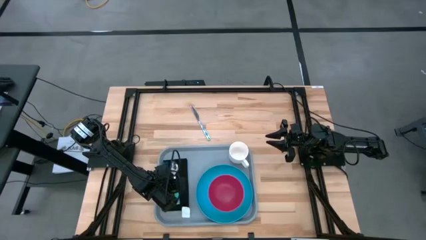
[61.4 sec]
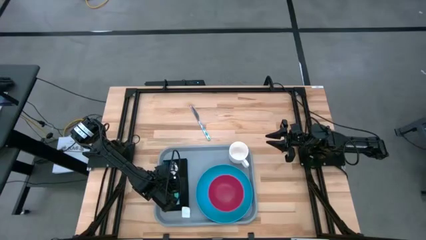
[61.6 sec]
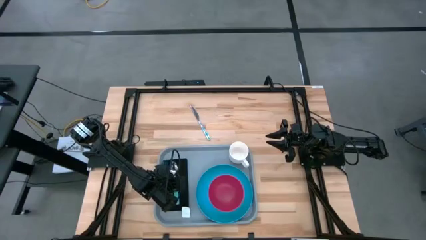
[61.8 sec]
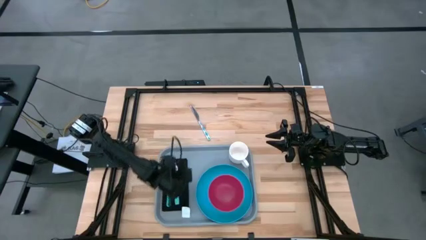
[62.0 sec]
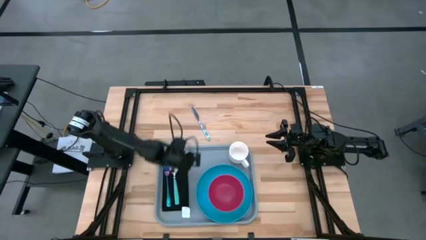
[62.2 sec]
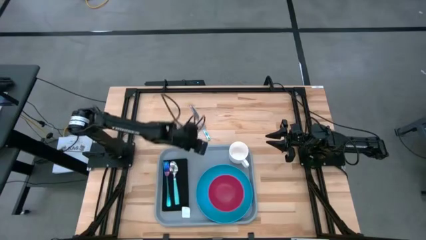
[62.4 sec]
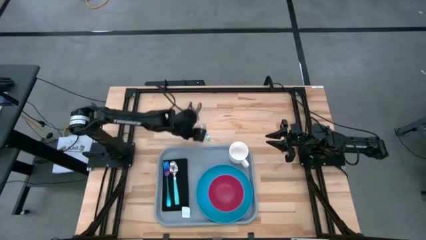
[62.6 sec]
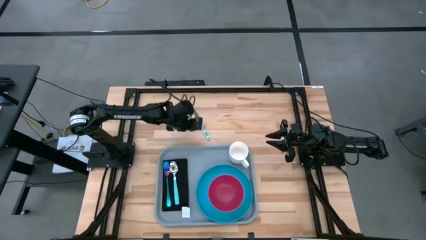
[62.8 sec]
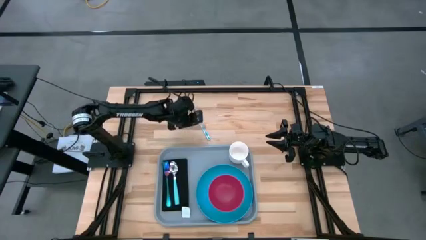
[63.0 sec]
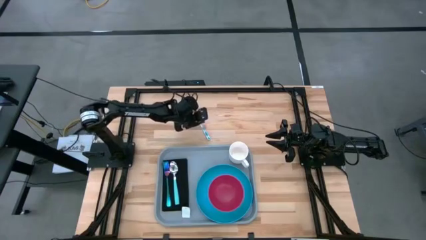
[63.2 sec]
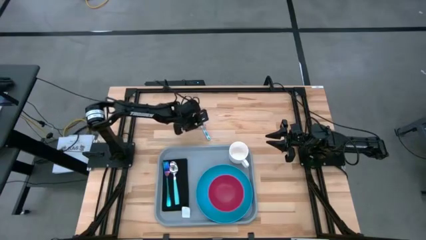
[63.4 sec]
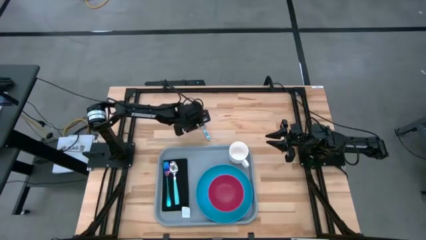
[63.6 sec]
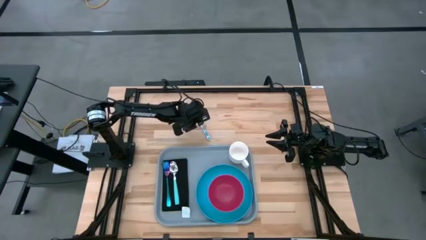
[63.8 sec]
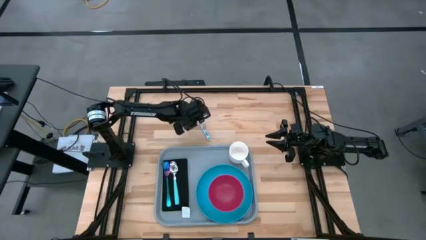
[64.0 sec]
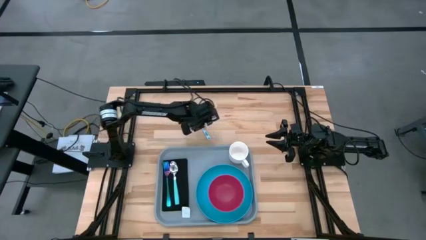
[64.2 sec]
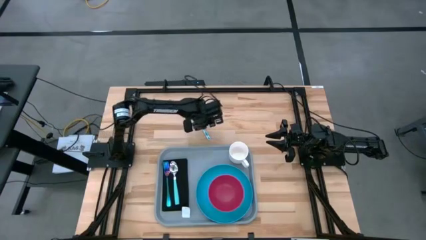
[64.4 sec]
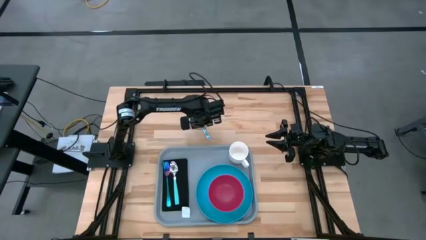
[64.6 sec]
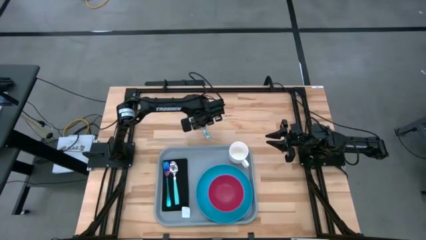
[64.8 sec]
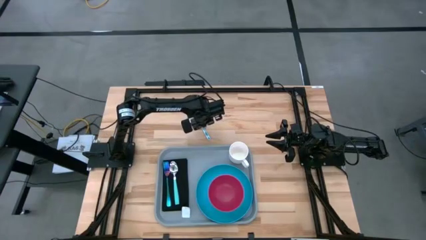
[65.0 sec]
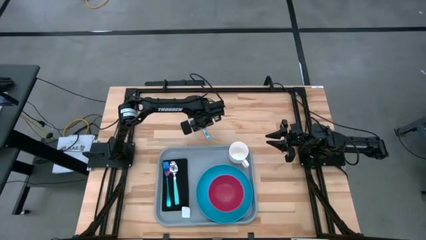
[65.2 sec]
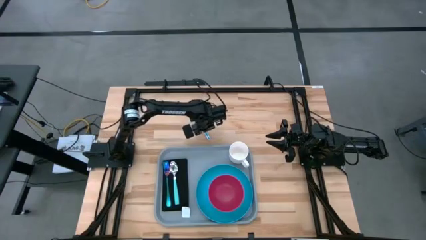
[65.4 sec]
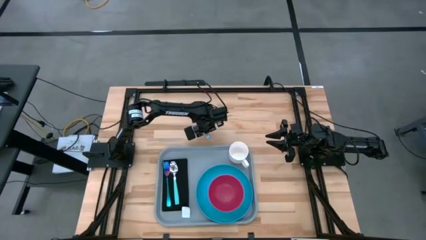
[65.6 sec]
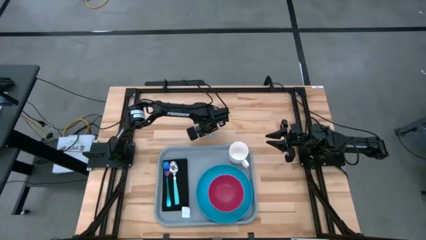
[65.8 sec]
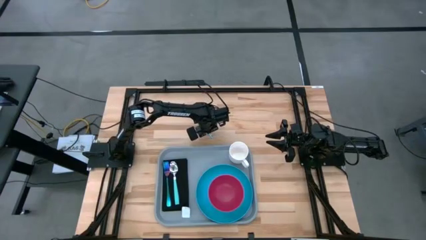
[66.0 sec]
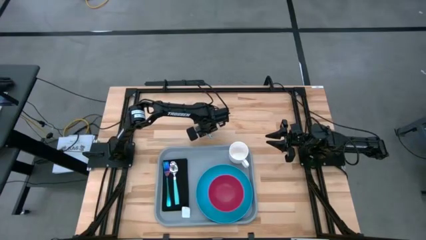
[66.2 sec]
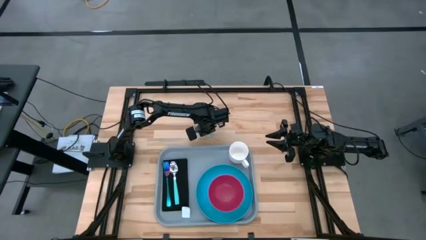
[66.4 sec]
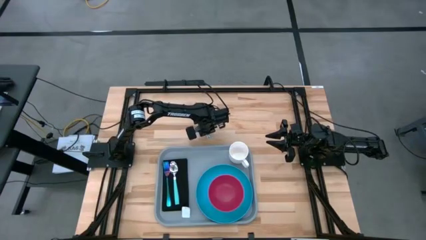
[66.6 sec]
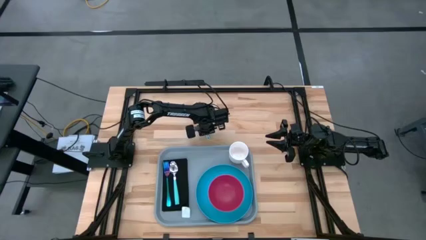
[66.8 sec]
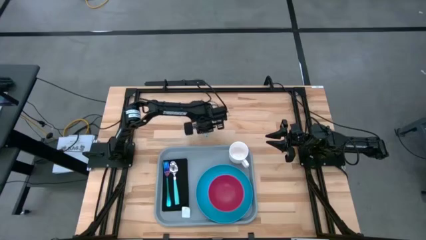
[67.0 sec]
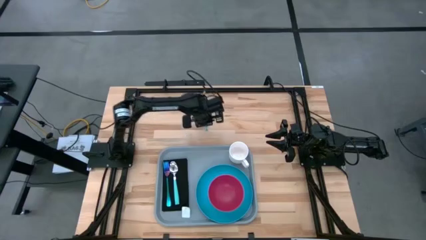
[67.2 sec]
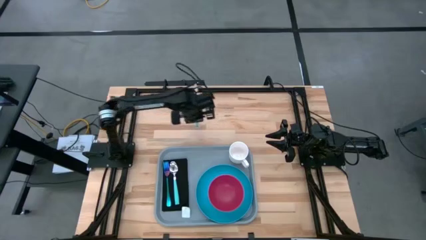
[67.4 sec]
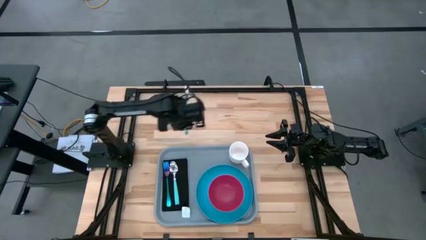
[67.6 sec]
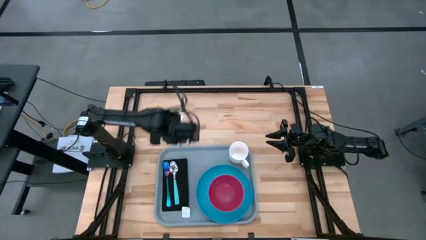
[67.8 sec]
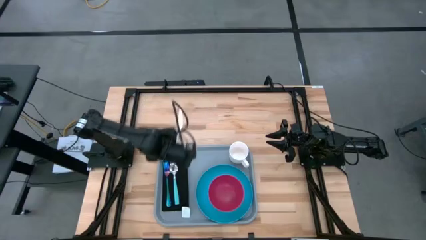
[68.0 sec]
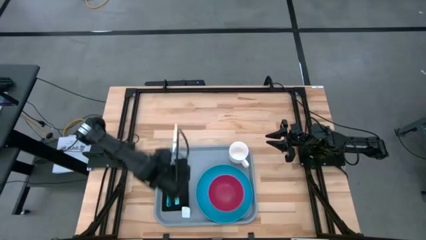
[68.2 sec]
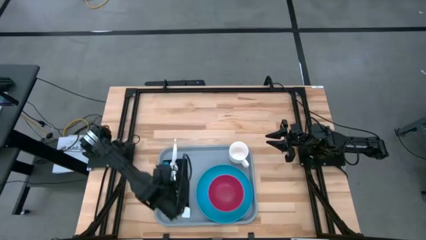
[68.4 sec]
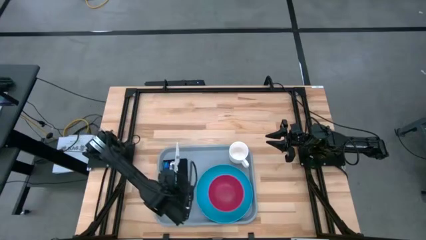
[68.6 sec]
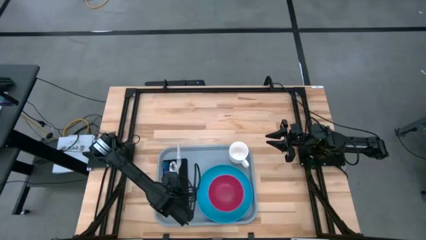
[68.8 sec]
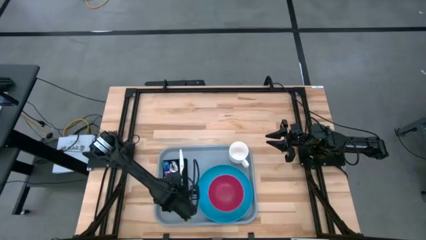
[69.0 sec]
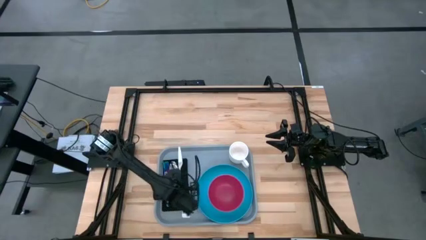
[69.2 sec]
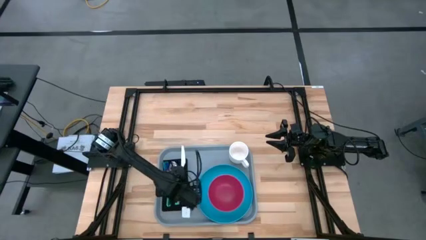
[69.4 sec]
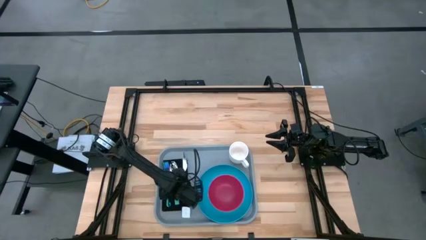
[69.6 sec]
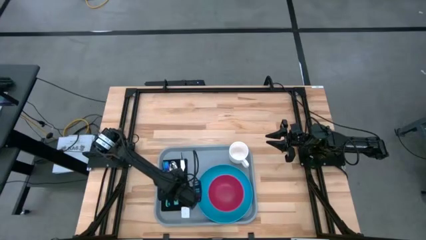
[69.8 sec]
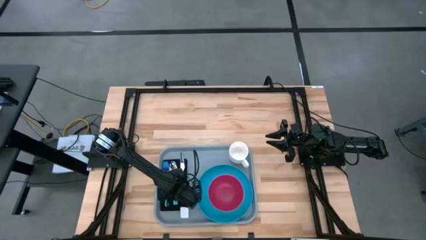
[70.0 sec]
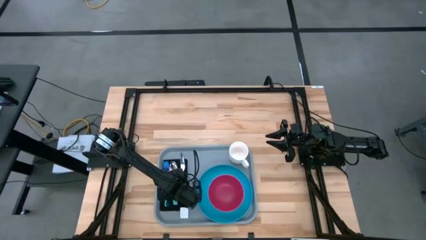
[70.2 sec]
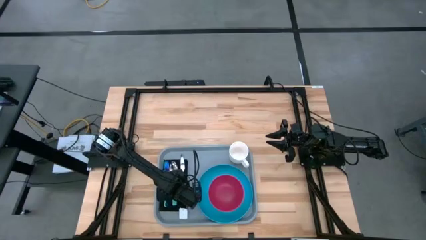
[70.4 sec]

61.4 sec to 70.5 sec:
Task: Set up tray
Put the blue patterned knife on top of the black napkin on the gray tray to the right of the green spoon

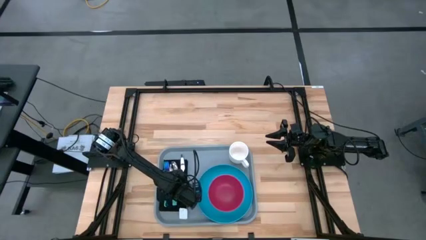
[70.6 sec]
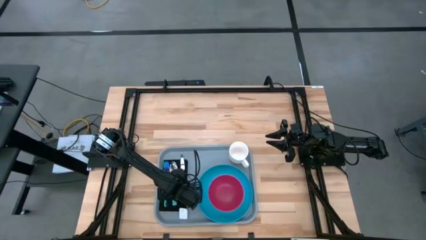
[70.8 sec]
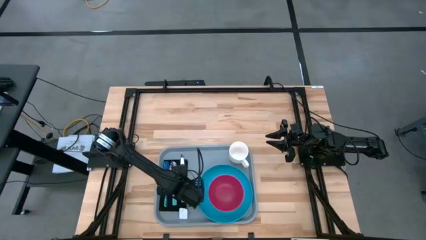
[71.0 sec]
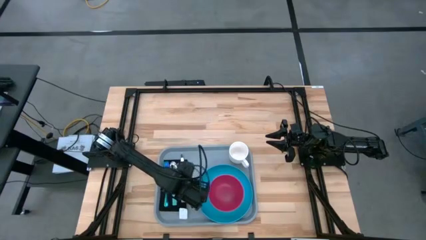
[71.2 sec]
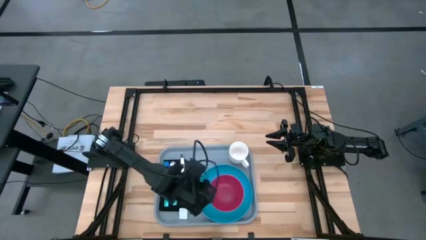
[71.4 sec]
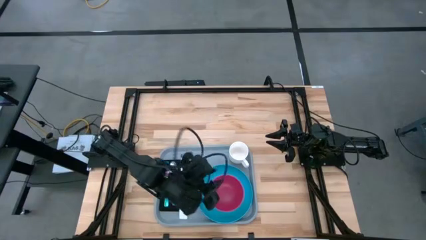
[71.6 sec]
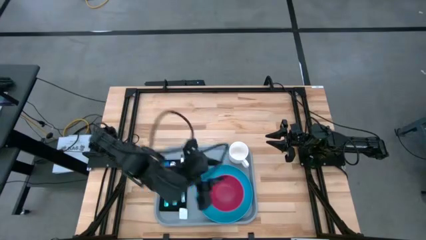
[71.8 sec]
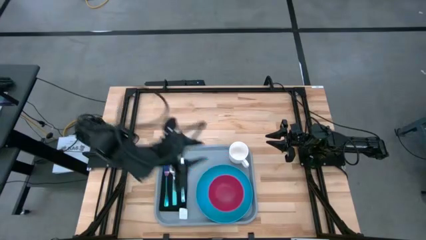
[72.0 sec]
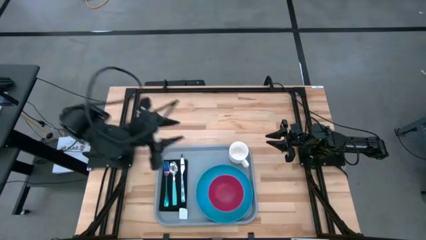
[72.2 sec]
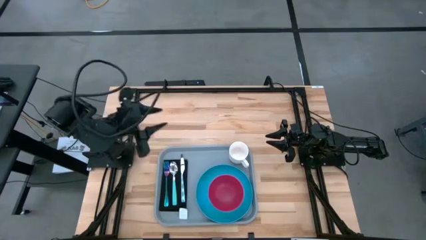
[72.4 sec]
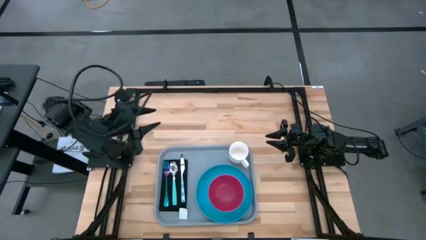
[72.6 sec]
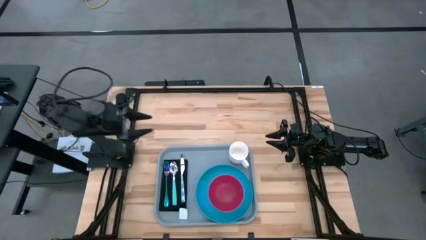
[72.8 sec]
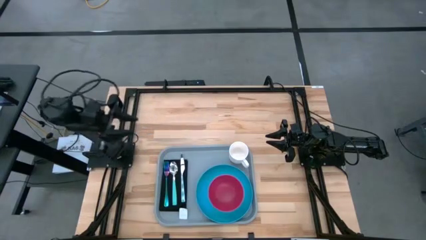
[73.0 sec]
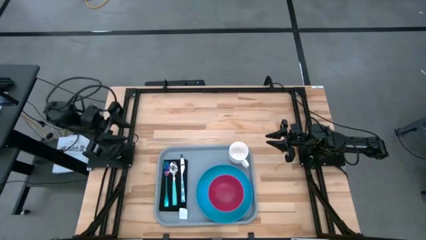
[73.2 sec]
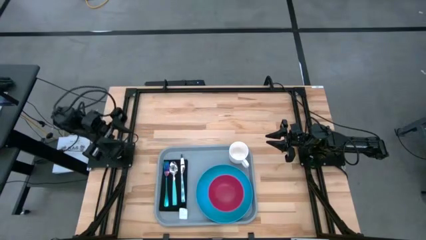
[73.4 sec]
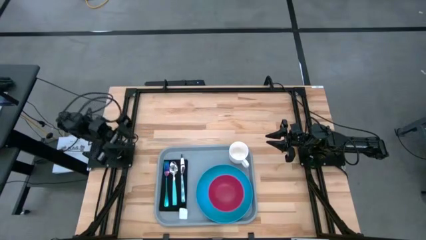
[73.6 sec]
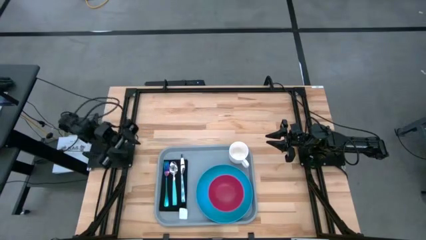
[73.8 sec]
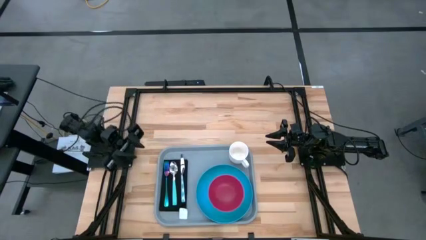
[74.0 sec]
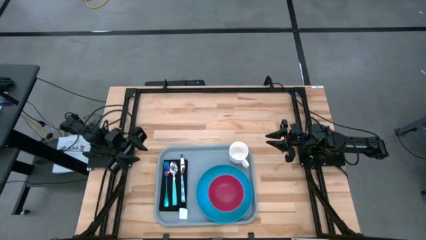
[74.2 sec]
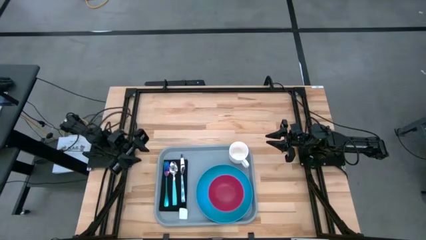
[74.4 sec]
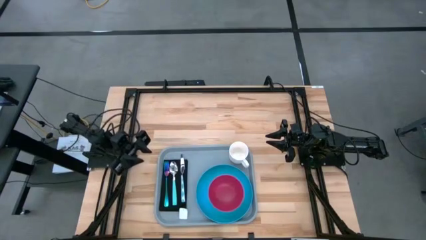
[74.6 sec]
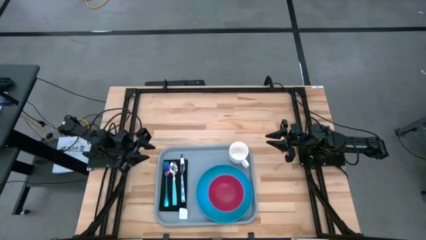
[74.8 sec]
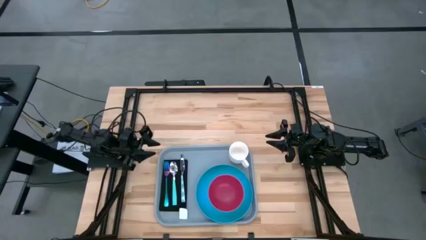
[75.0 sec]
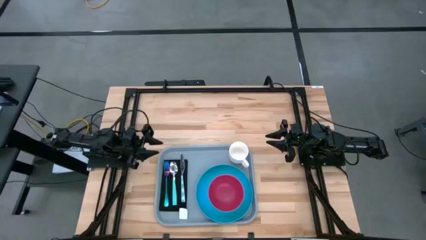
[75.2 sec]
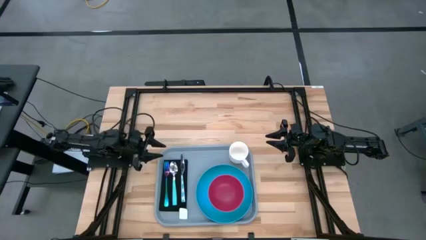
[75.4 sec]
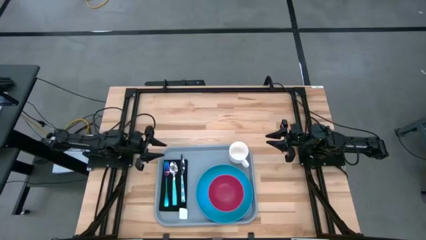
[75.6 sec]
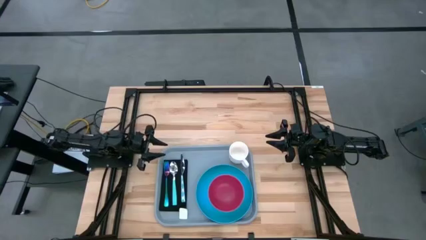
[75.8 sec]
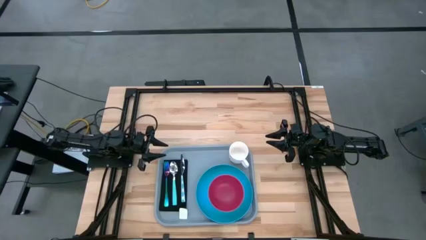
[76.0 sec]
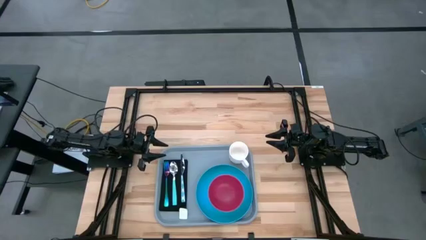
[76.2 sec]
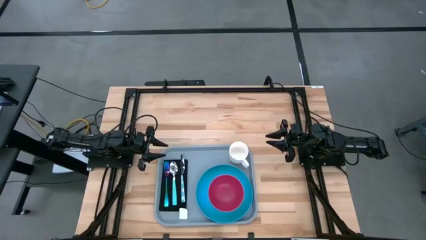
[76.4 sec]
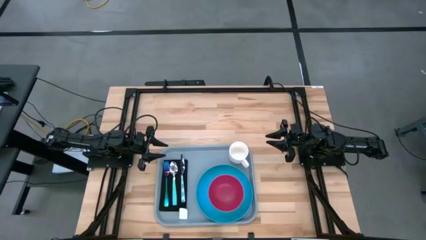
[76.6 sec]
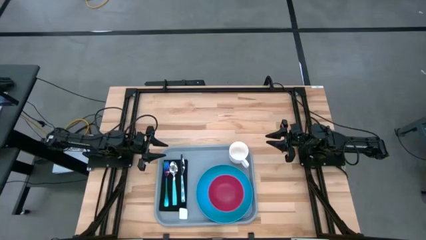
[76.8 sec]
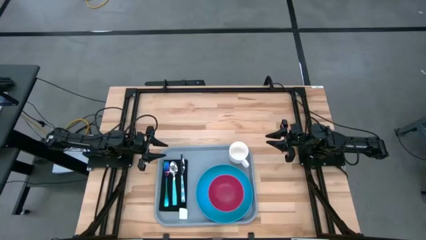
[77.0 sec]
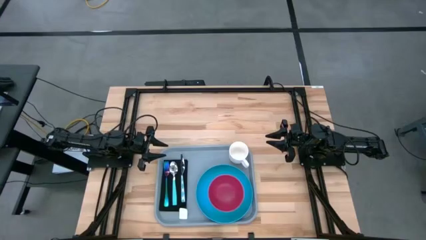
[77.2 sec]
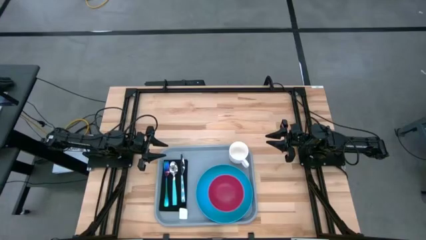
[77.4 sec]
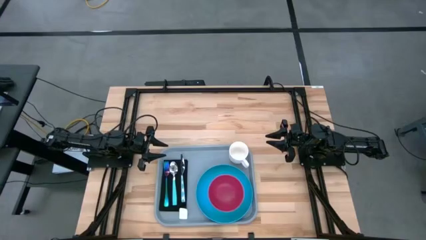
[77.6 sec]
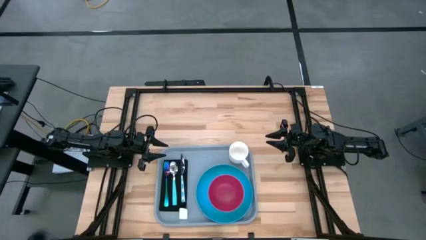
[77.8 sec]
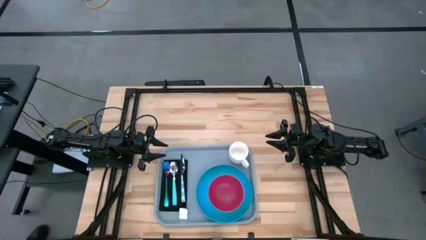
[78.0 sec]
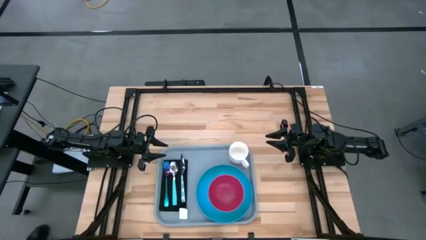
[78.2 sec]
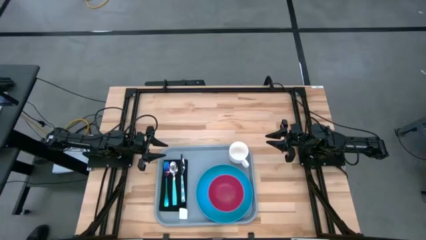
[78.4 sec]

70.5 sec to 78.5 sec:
Return to Home Position
